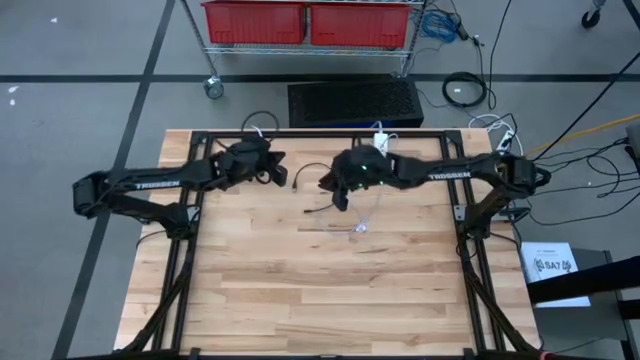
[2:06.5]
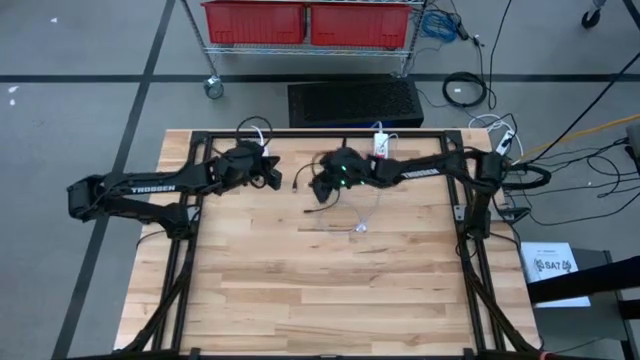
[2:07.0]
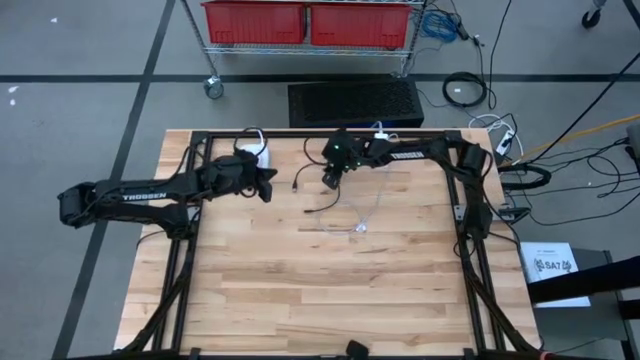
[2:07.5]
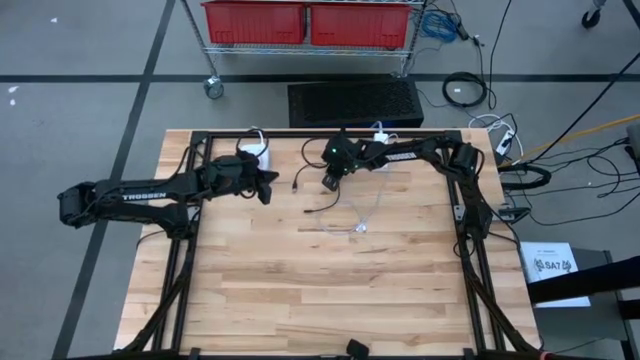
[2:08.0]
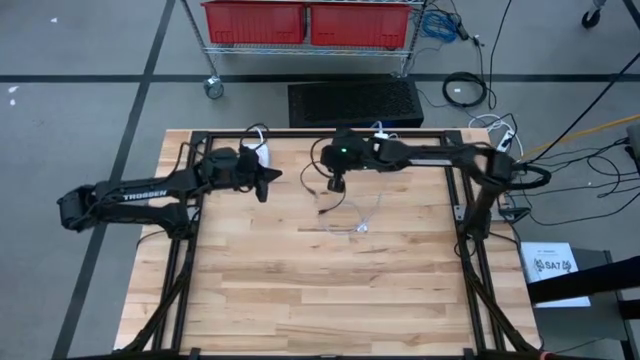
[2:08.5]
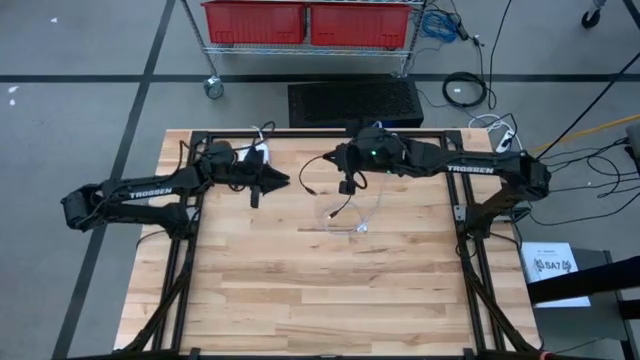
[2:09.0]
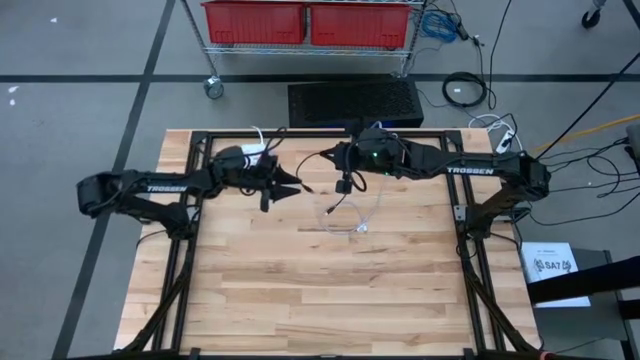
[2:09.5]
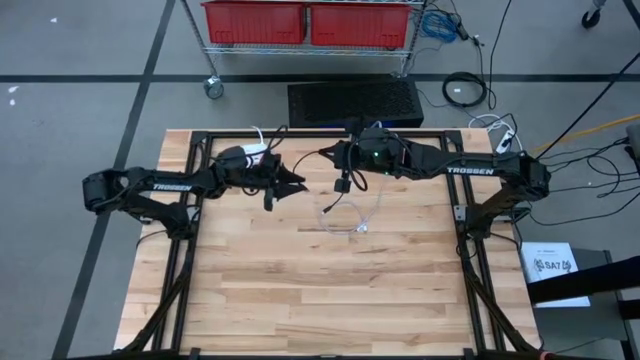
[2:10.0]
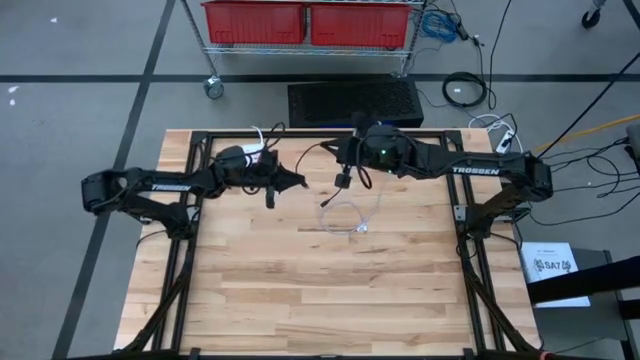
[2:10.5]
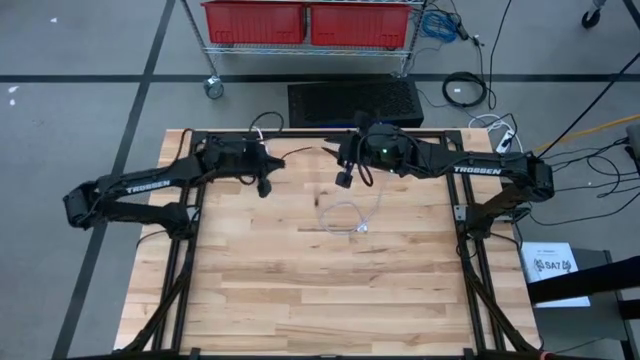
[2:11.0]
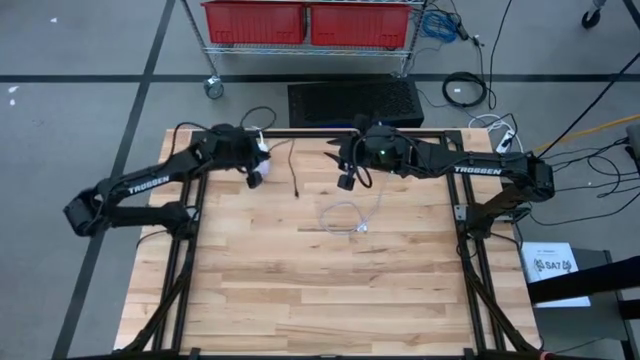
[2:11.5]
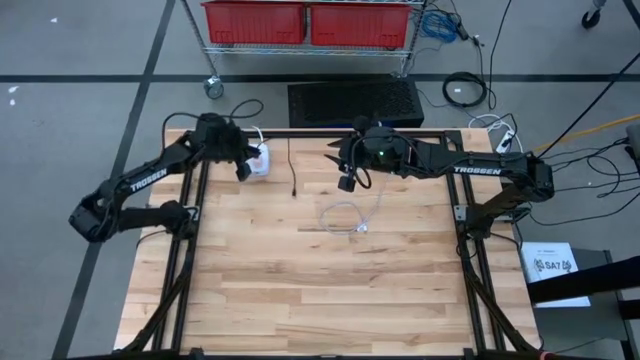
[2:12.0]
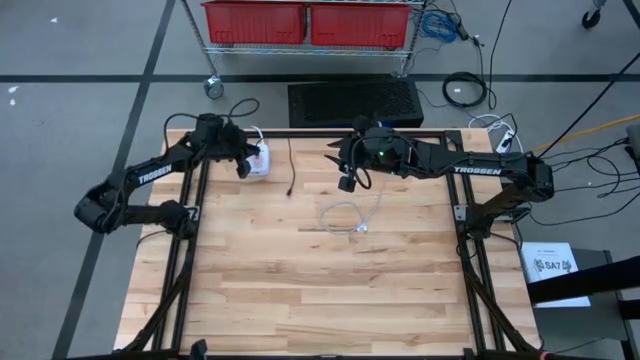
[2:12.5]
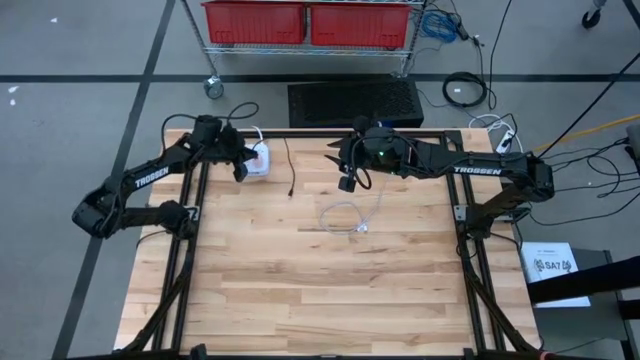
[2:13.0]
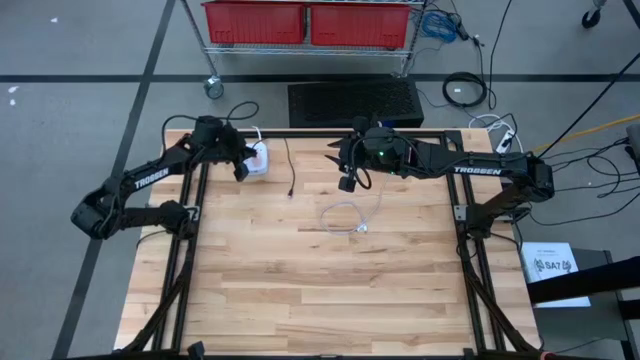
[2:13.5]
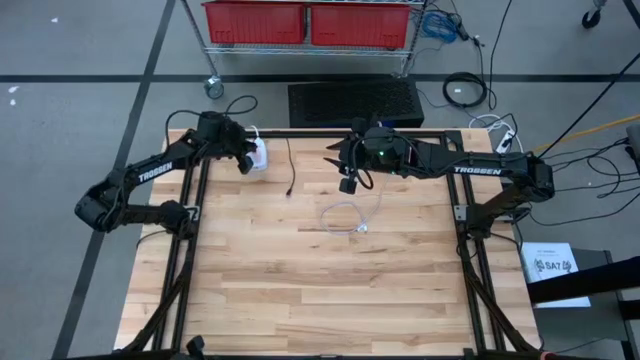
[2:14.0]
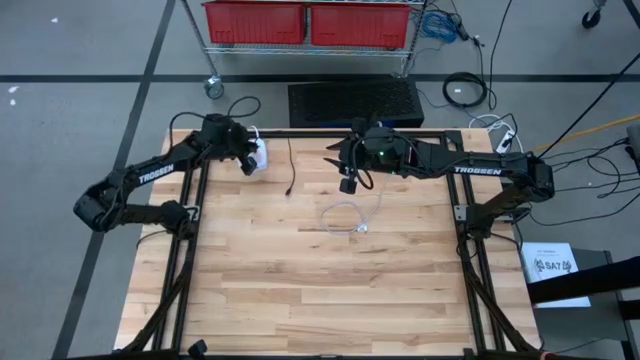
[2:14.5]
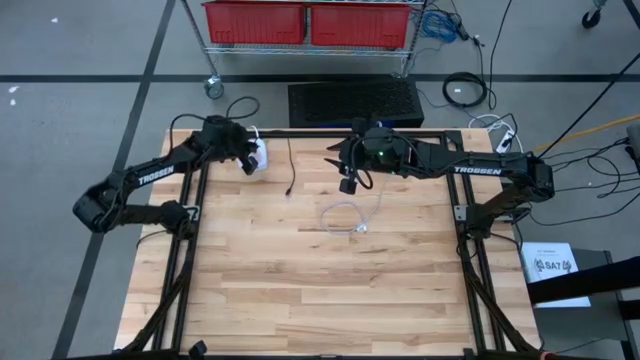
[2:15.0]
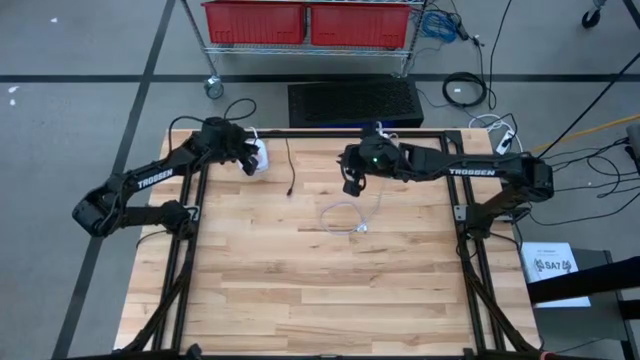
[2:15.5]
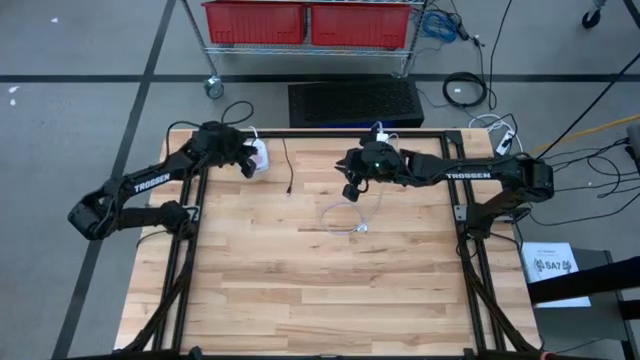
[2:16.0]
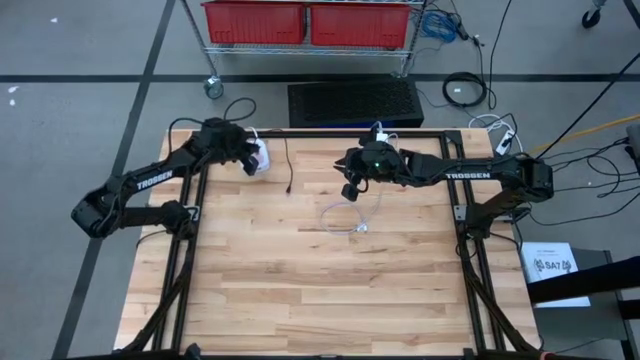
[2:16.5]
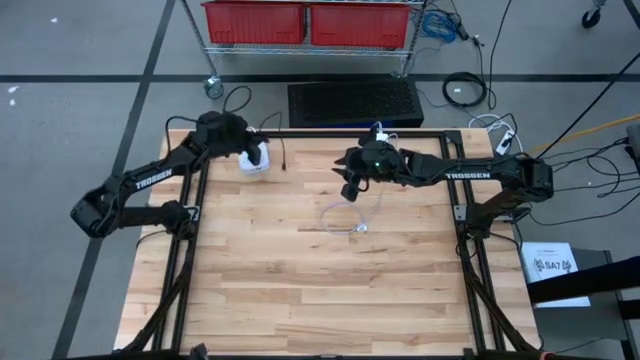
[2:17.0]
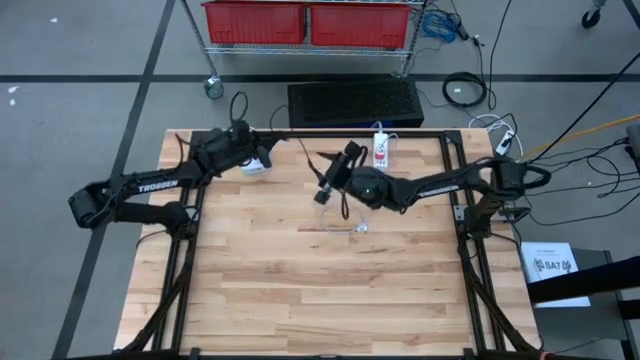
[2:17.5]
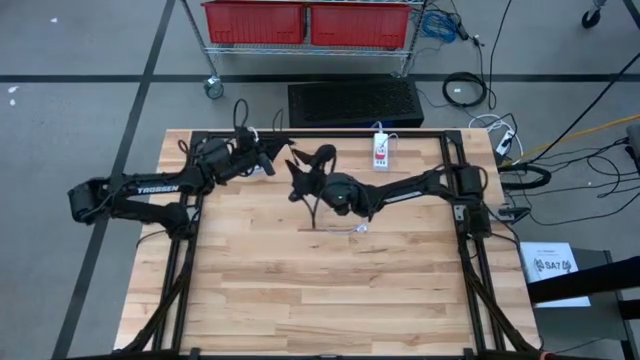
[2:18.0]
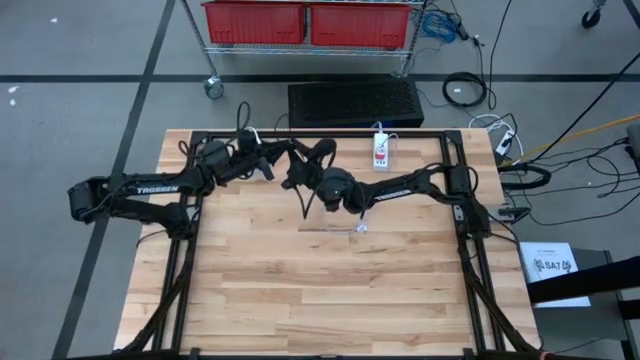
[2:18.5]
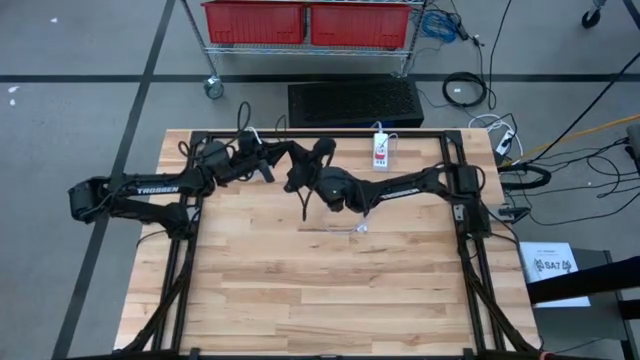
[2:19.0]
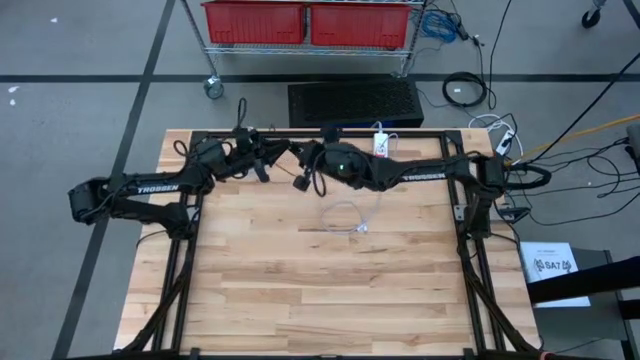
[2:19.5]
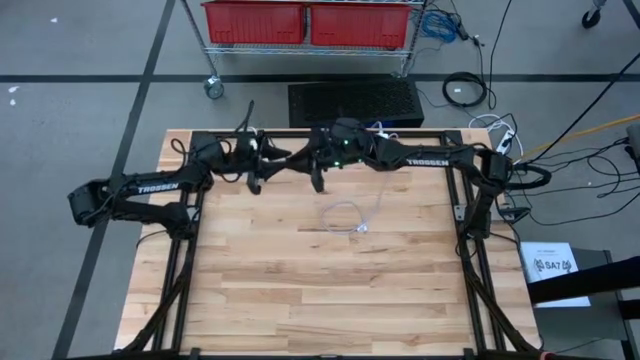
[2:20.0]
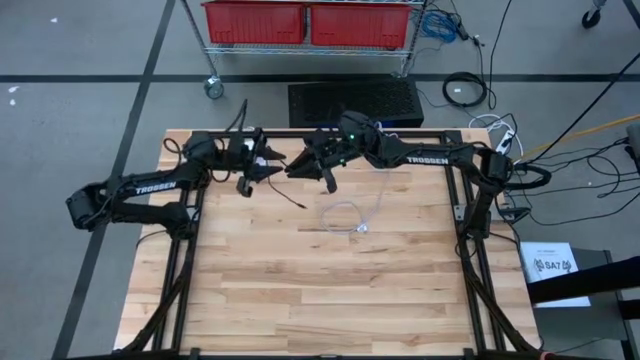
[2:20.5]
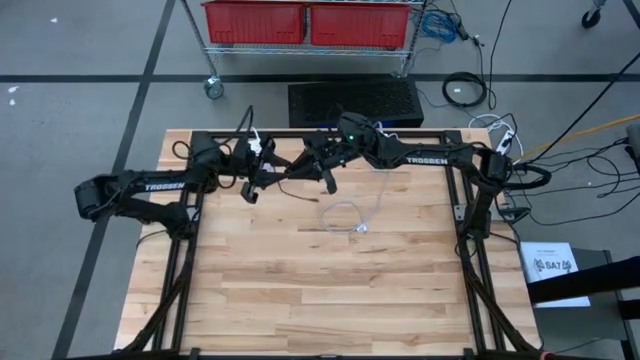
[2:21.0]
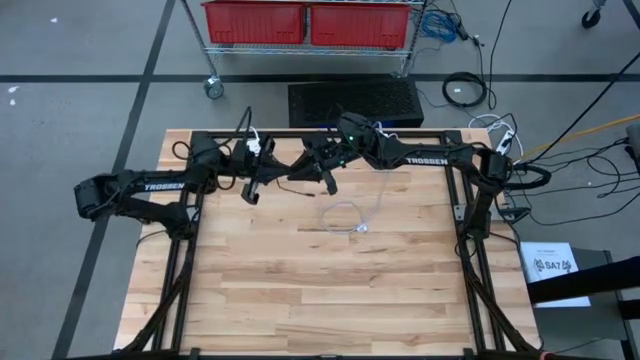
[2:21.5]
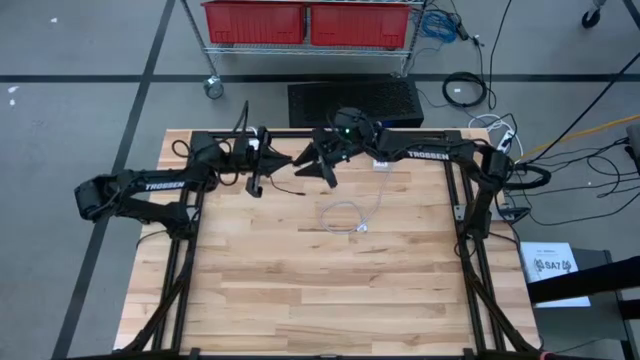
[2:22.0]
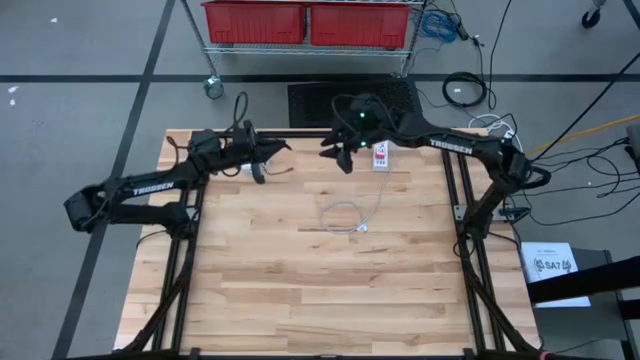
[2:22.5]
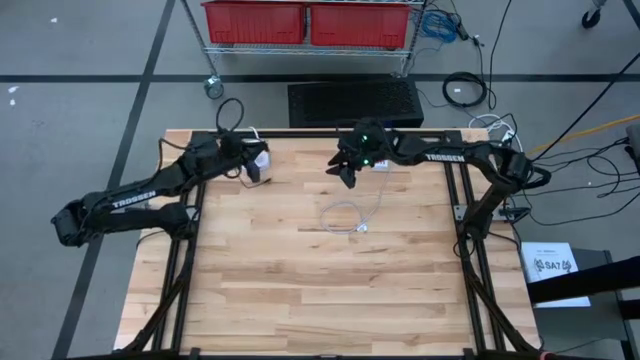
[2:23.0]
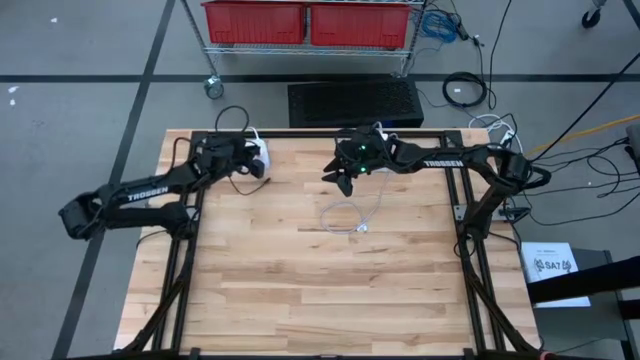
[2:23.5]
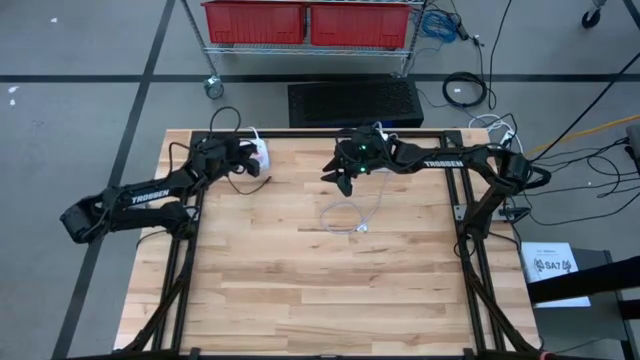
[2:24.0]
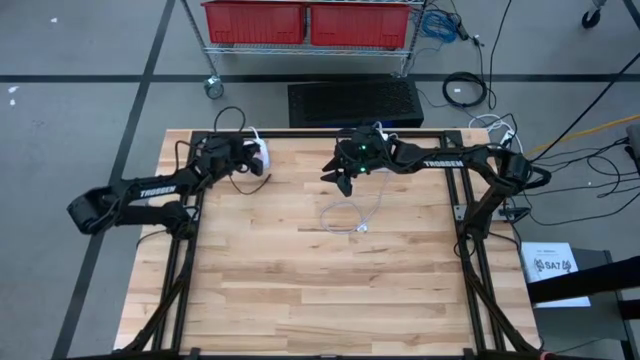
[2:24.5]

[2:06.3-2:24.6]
Task: Insert USB
Insert the black charger cable into the orange charger adapter

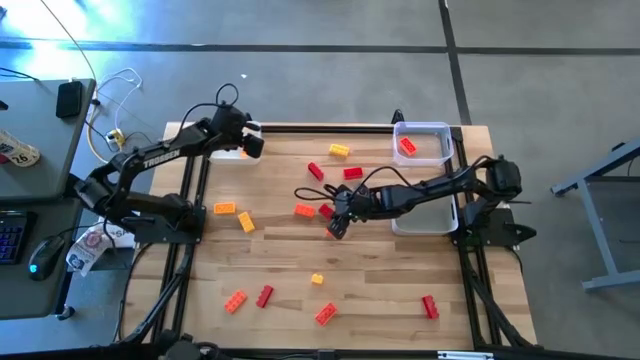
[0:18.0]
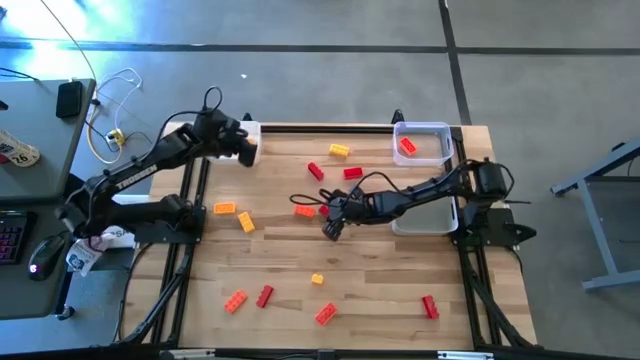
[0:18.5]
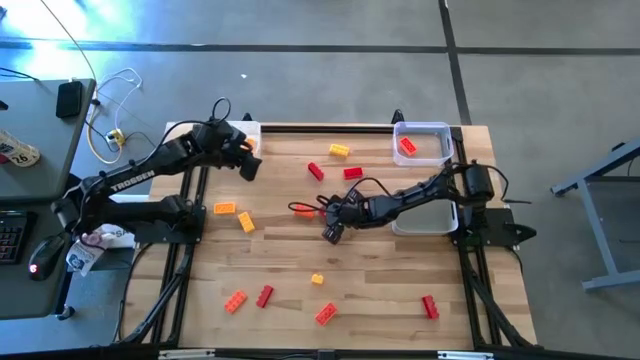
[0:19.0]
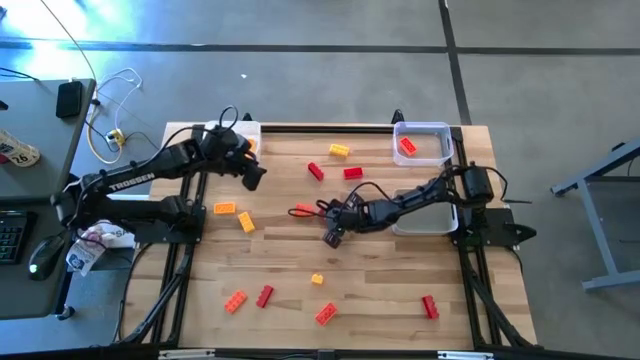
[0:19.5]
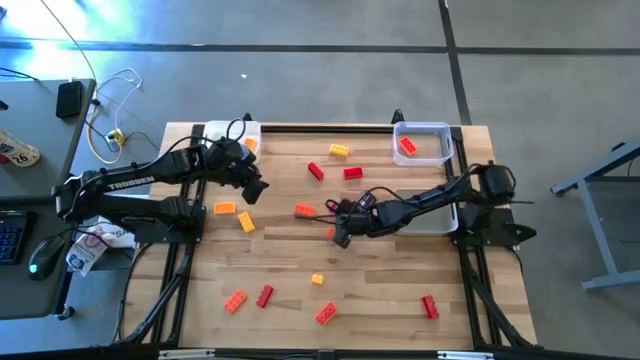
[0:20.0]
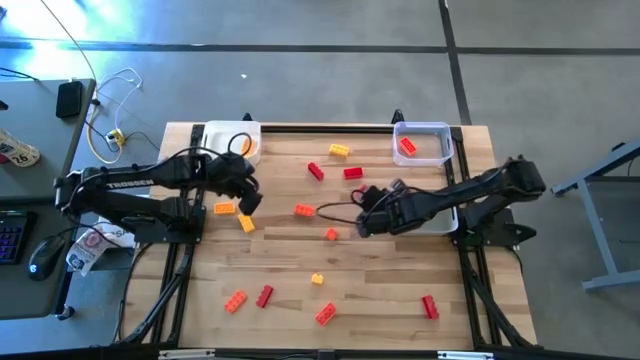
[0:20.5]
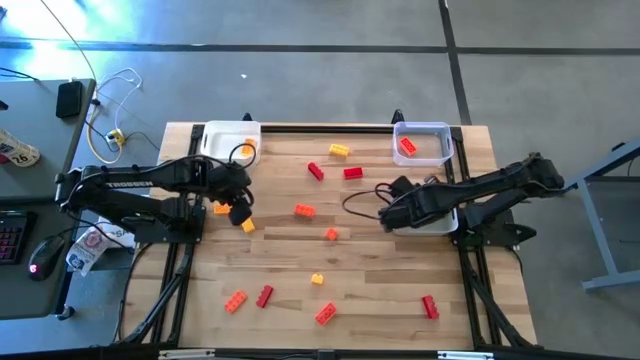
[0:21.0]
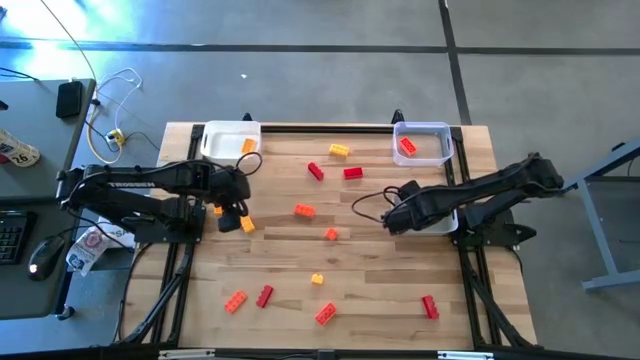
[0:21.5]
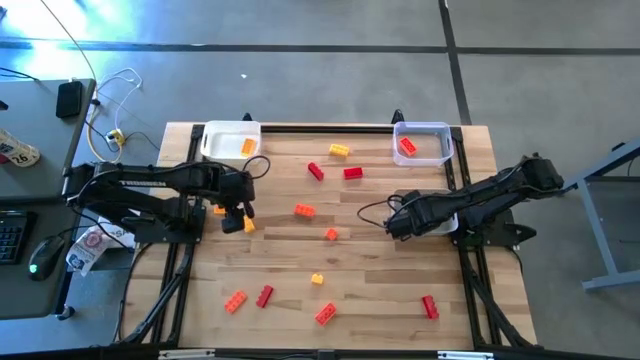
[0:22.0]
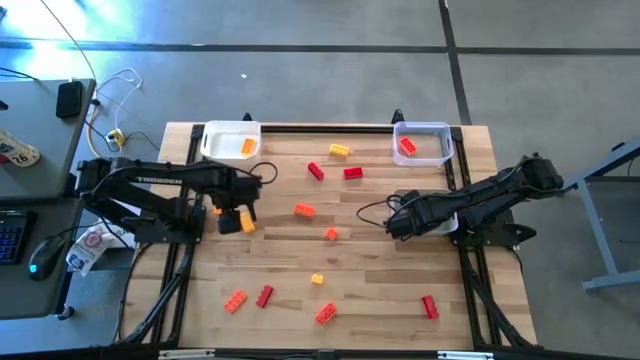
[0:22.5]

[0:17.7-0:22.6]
Task: Sort & place blocks by color
Put the red game piece into the gray bin
